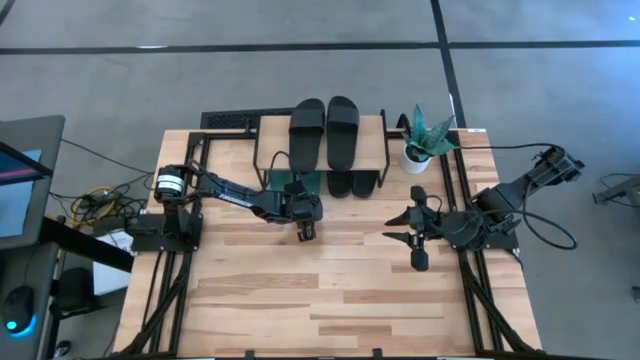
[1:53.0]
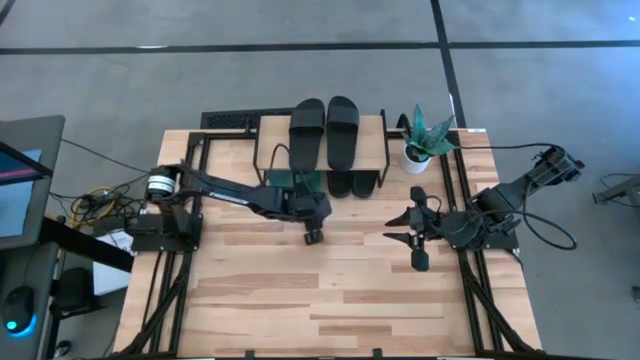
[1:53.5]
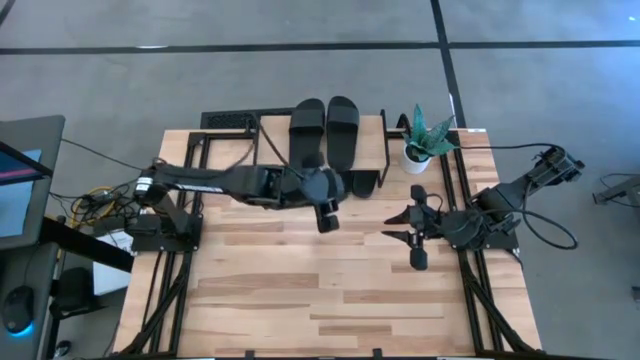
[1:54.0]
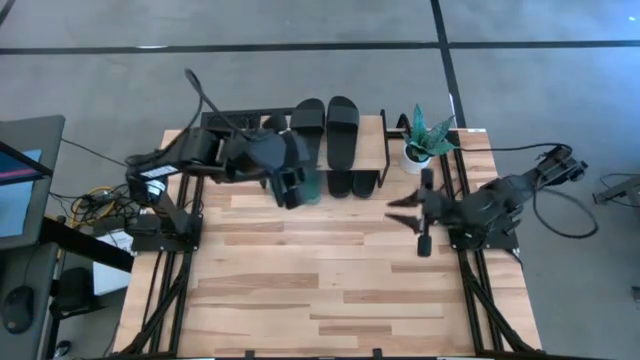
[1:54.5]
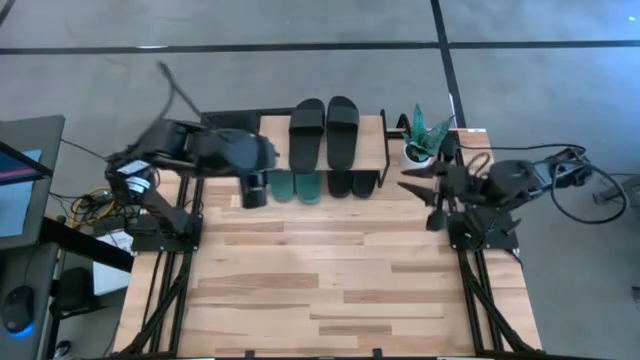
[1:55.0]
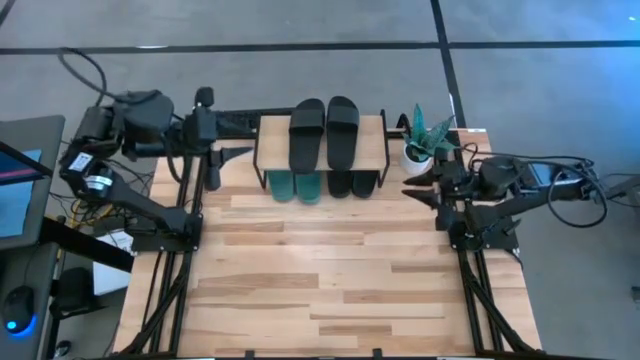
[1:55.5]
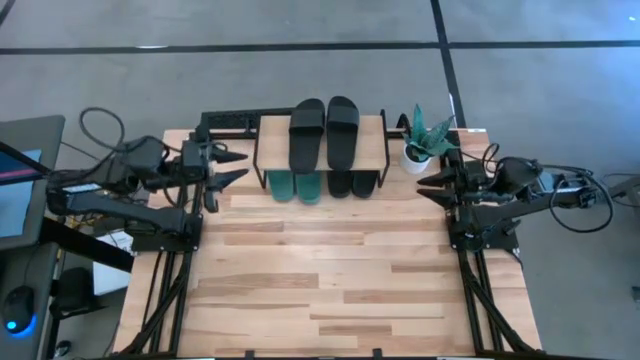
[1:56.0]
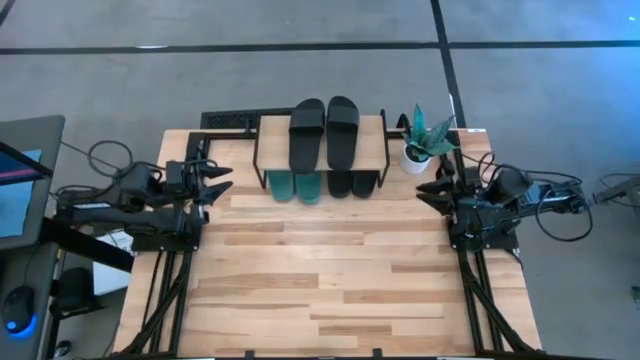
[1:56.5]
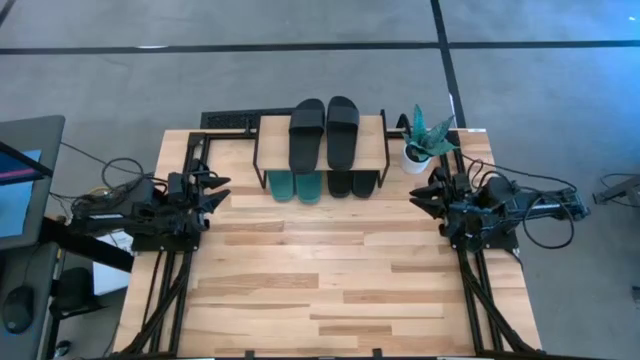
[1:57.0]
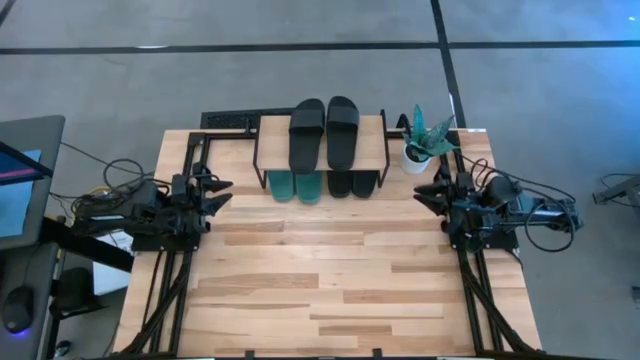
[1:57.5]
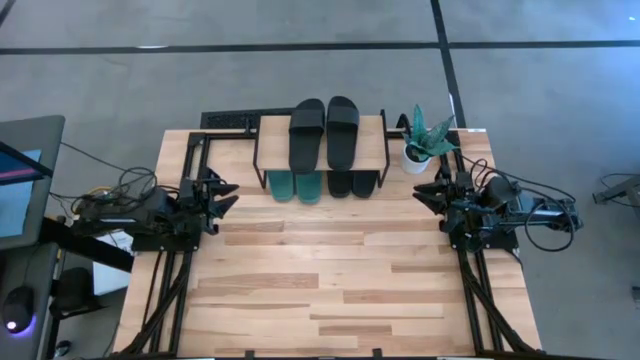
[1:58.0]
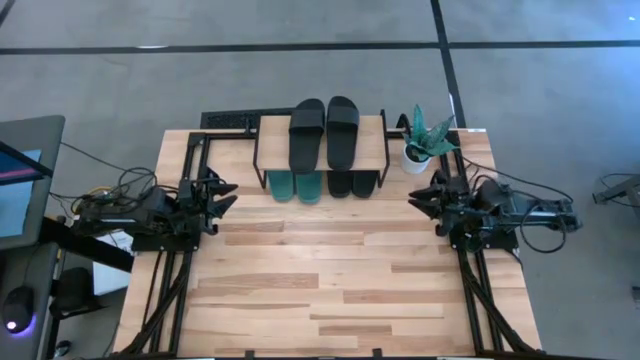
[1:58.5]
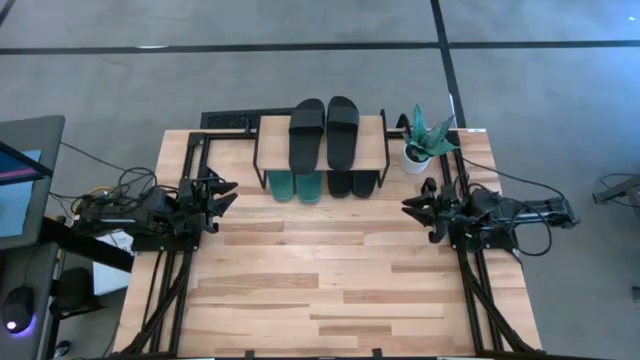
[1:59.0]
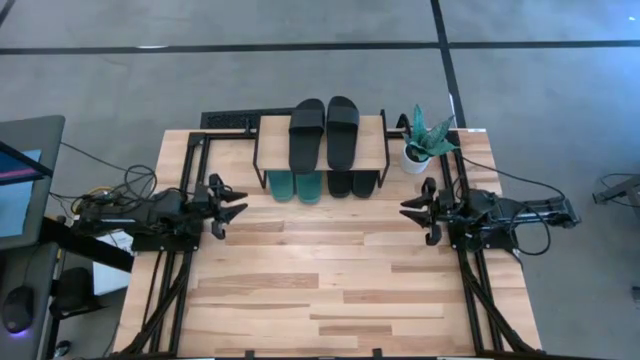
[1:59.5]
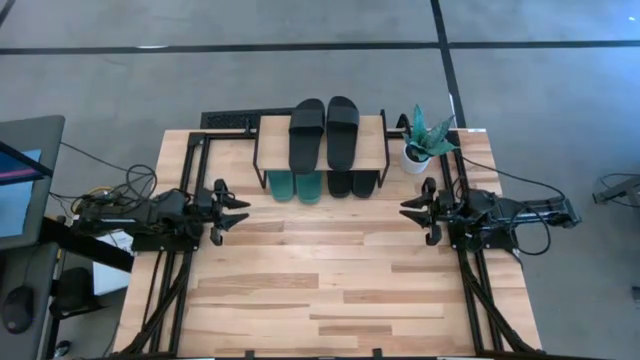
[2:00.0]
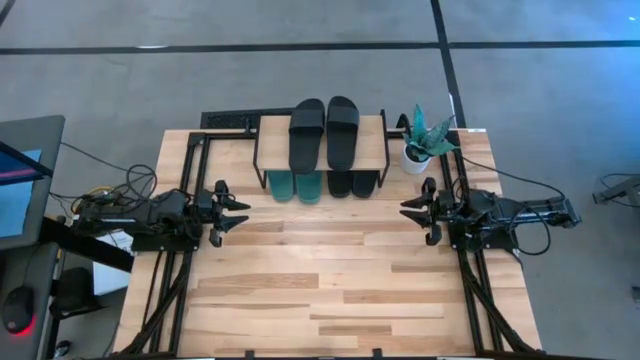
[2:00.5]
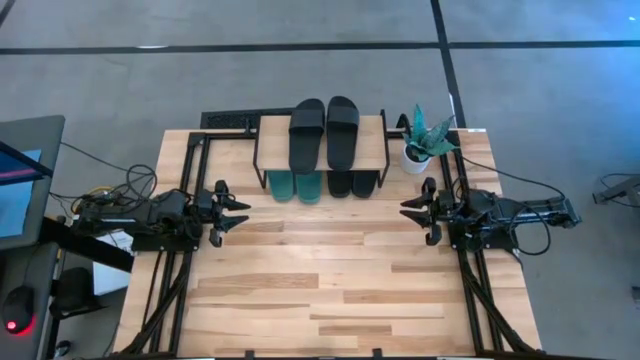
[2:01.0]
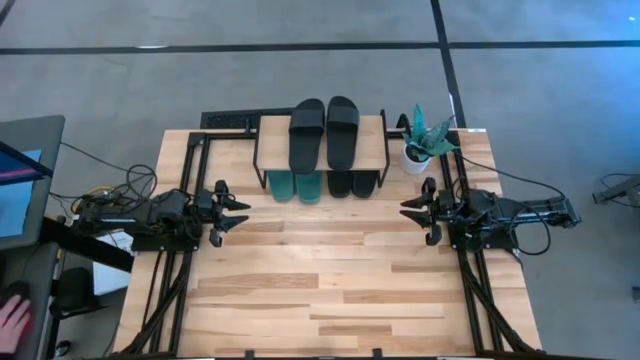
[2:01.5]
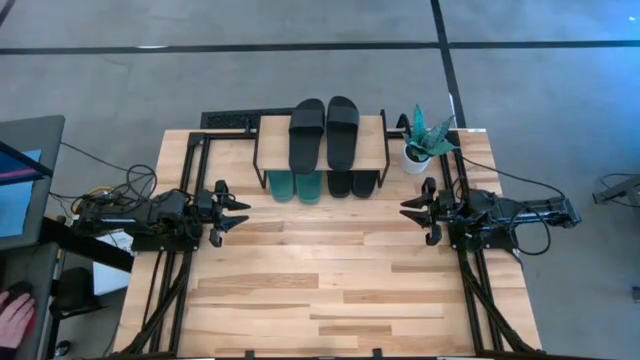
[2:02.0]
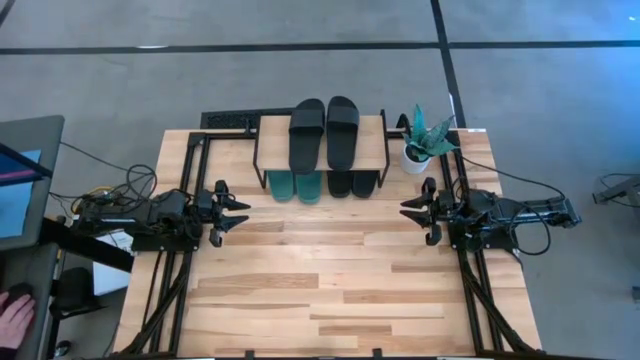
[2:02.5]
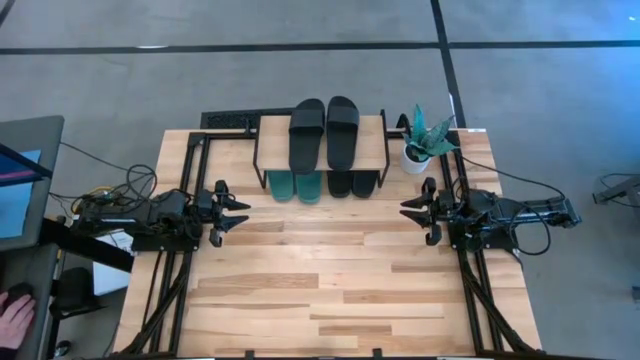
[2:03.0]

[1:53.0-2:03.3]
Task: Pick and place slides into the shelf
Return to Home Position

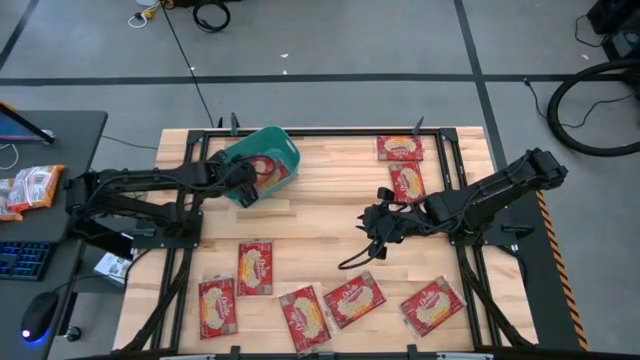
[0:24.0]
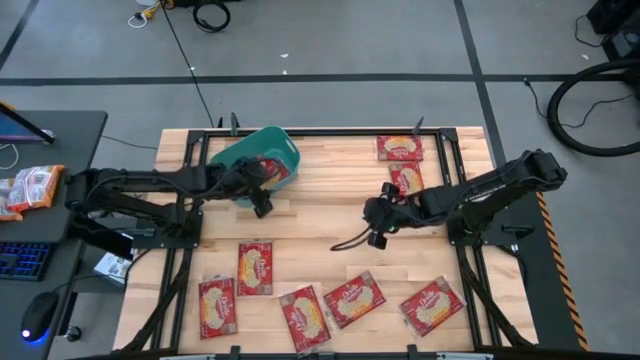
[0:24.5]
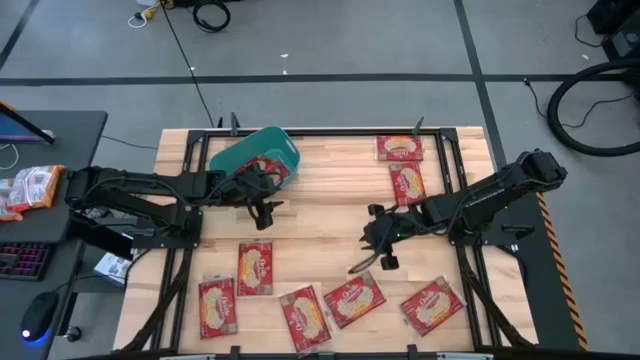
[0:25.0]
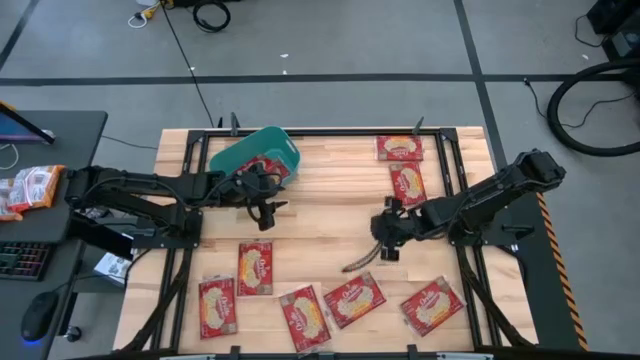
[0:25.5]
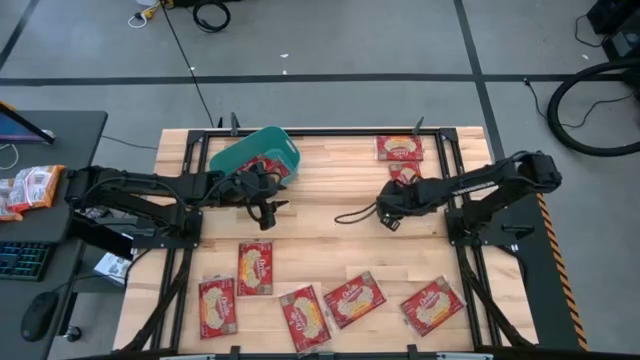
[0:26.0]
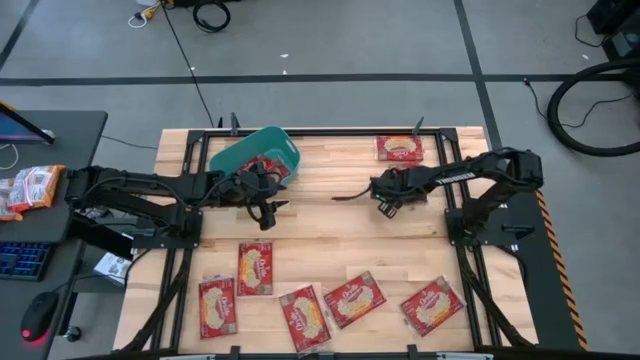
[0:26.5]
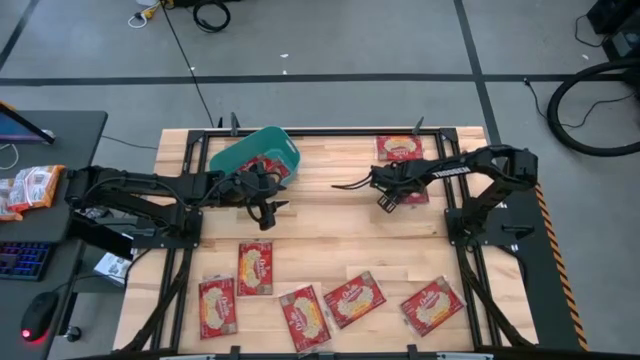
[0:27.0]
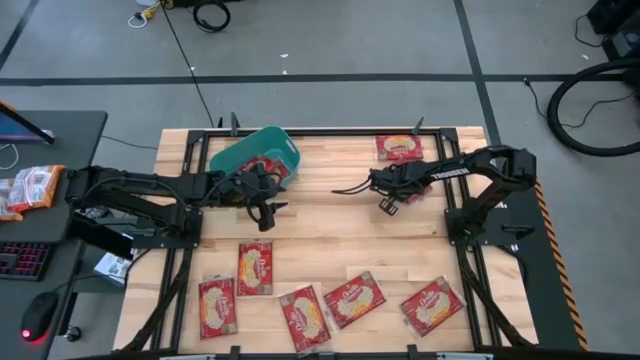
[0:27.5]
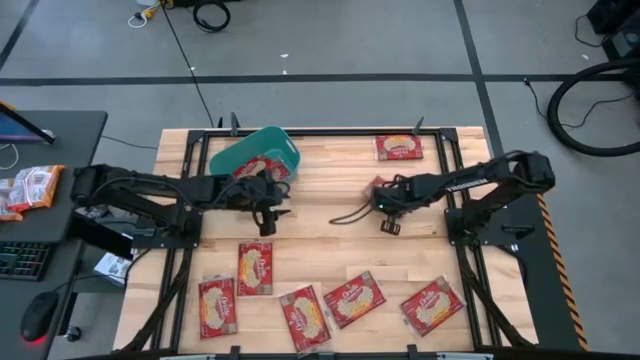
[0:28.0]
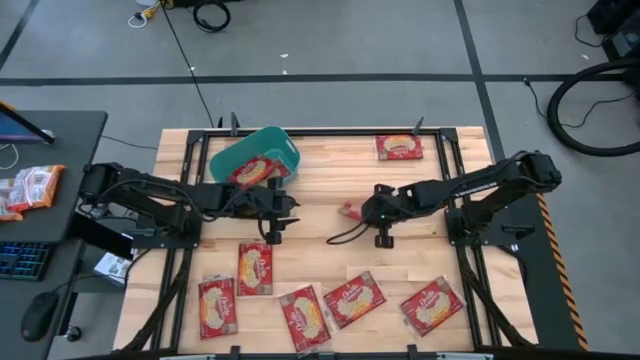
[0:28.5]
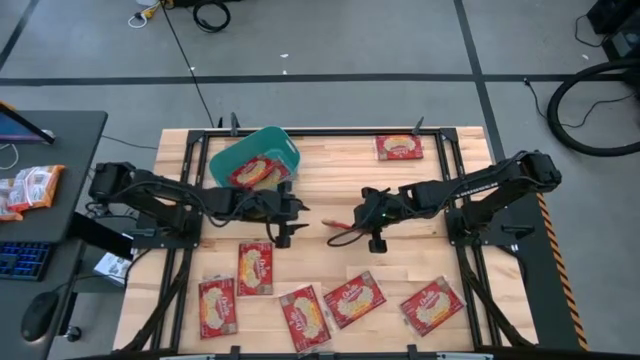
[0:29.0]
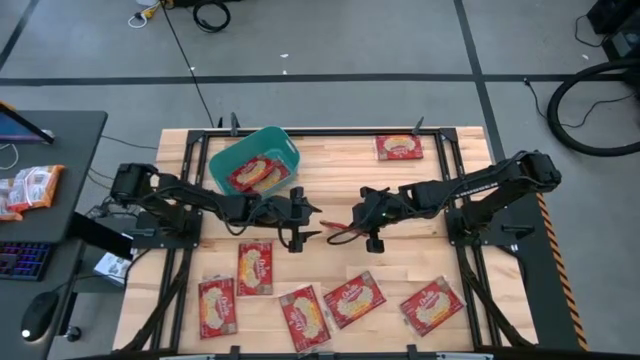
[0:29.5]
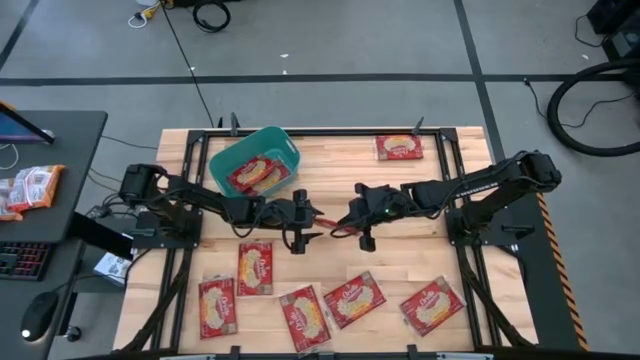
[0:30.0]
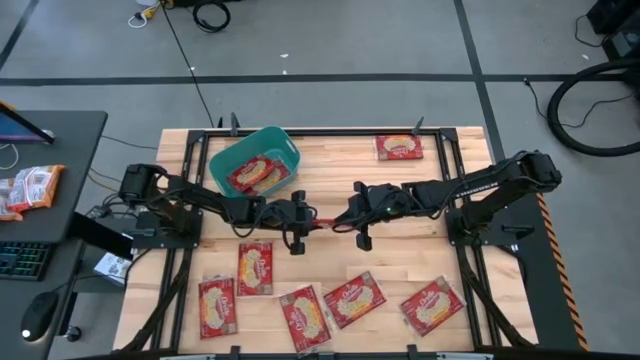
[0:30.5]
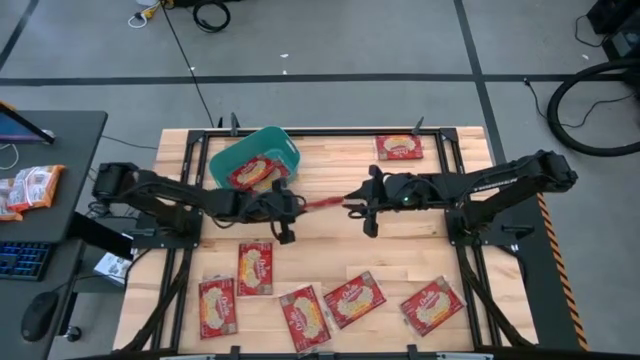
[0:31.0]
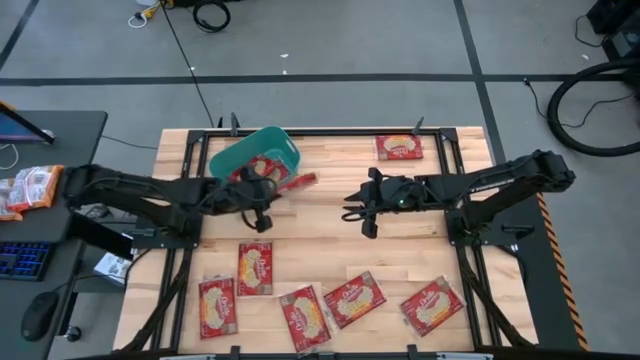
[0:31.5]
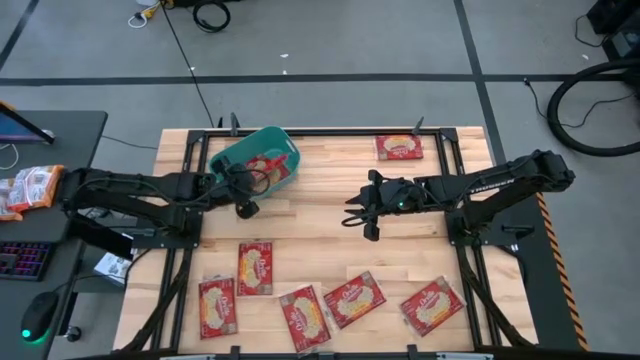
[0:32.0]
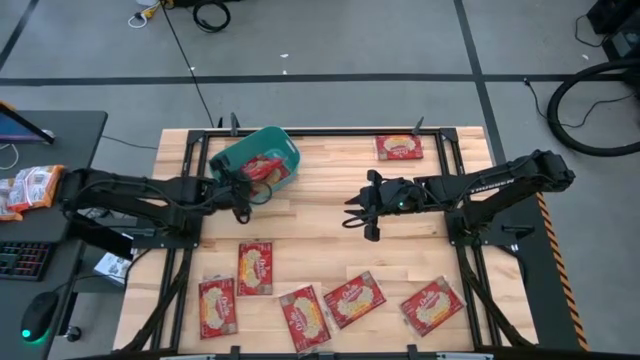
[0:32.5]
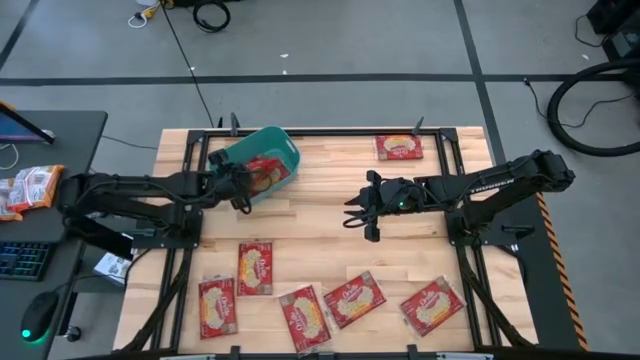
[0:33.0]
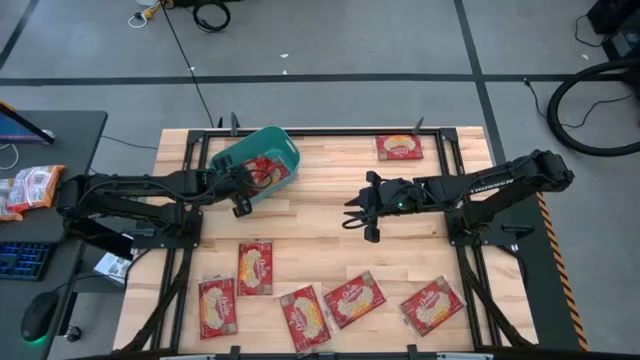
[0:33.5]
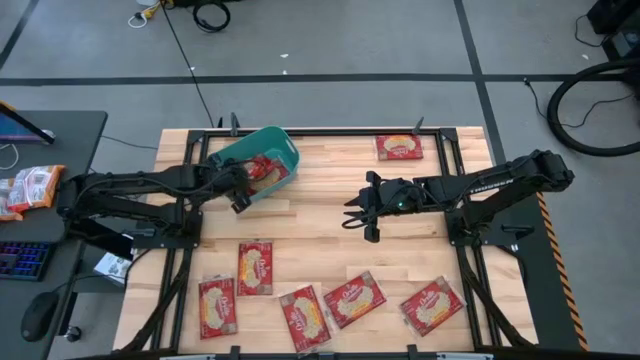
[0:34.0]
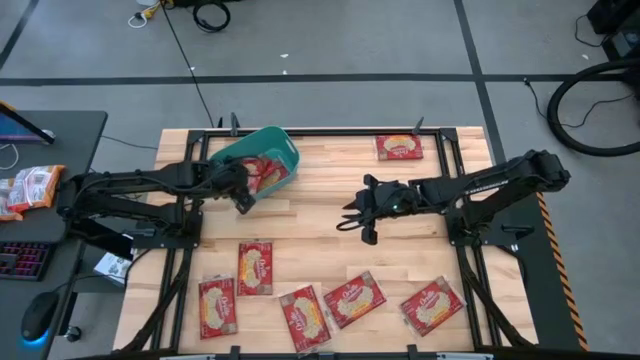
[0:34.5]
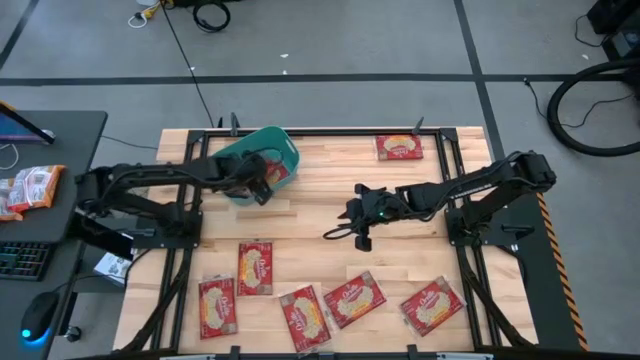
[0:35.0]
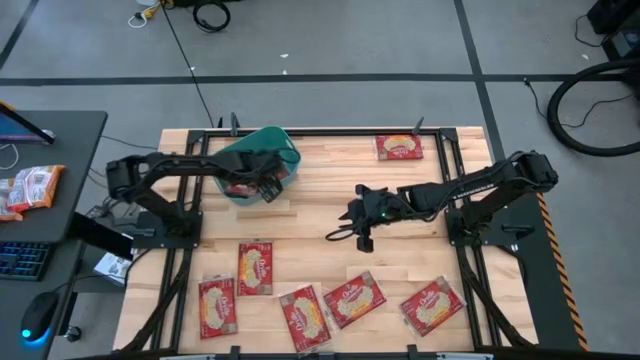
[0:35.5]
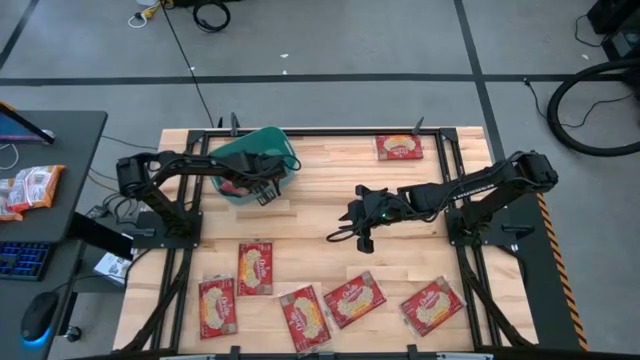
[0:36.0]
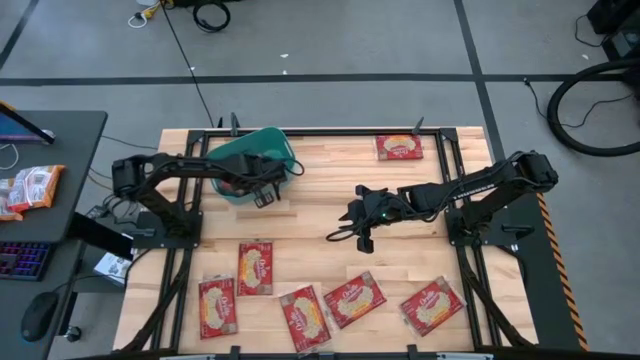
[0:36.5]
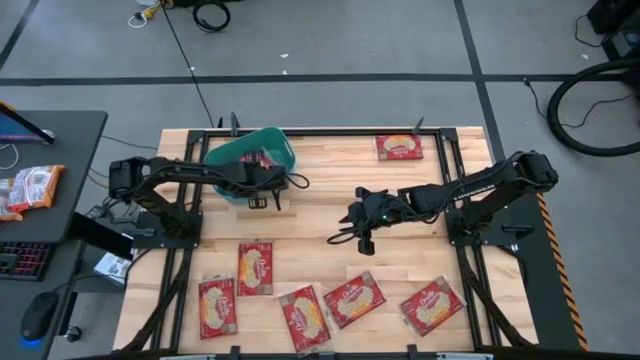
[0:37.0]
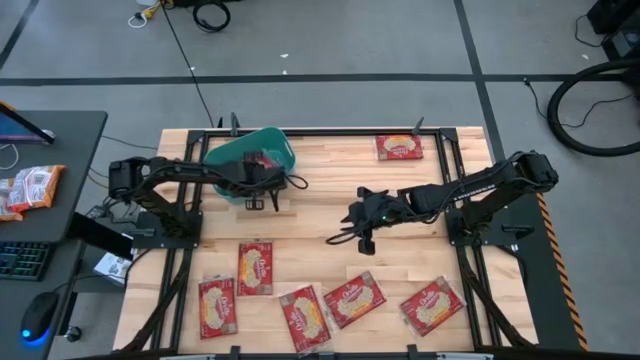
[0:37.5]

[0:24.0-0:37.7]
Task: Sort popcorn bags into baskets
Put the popcorn bag into the bin
